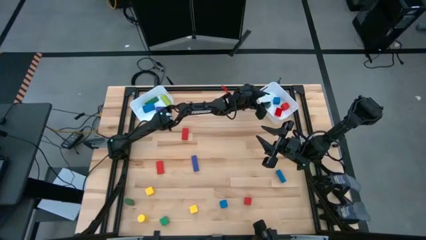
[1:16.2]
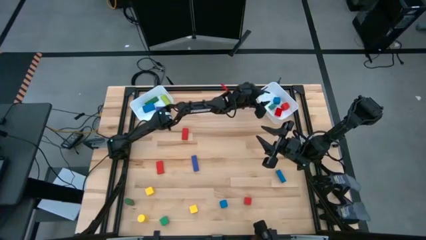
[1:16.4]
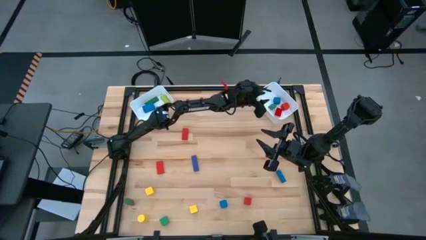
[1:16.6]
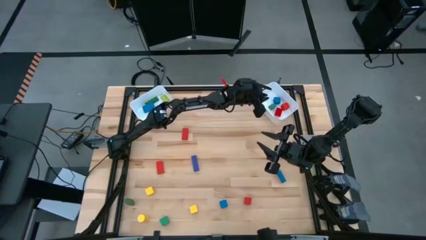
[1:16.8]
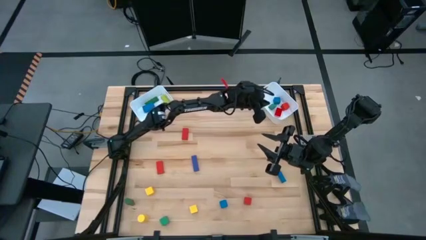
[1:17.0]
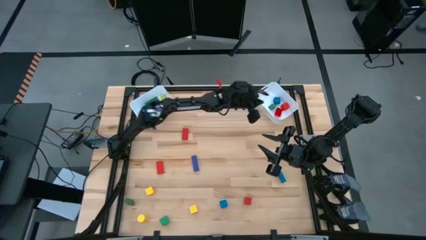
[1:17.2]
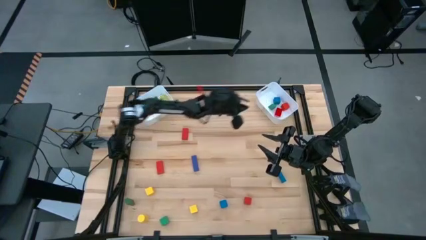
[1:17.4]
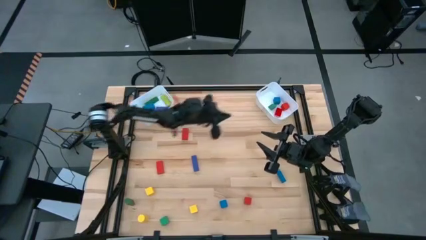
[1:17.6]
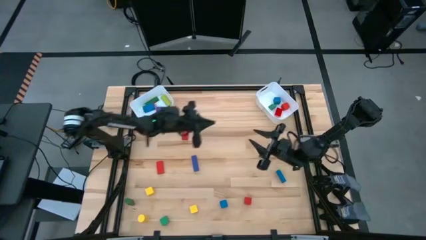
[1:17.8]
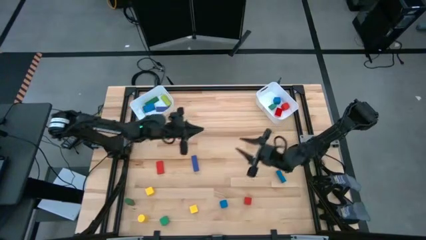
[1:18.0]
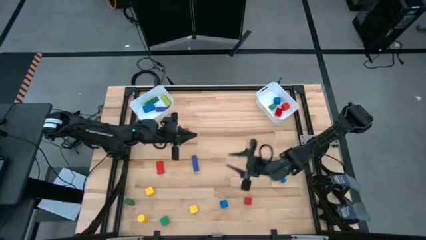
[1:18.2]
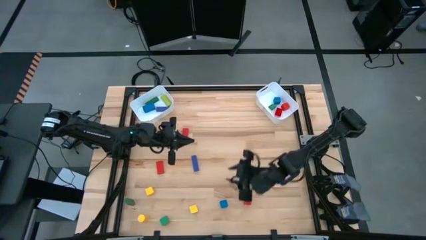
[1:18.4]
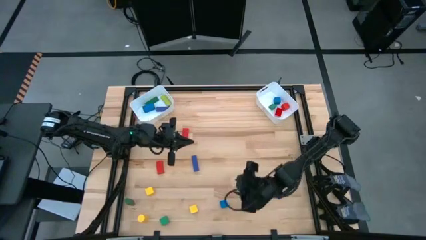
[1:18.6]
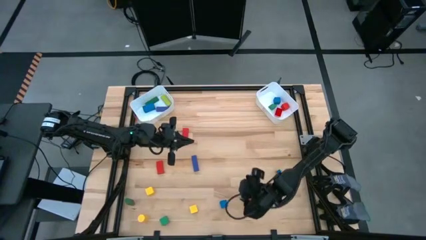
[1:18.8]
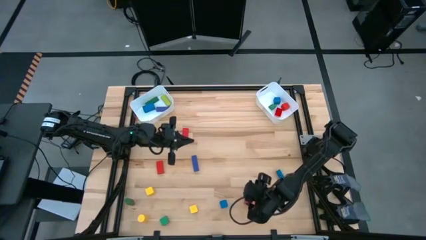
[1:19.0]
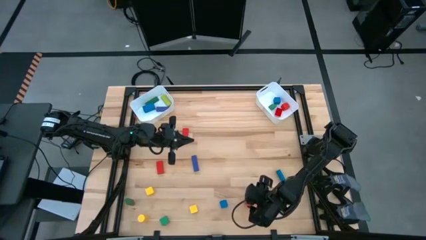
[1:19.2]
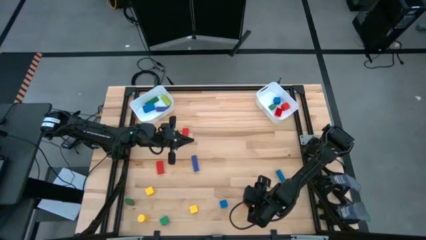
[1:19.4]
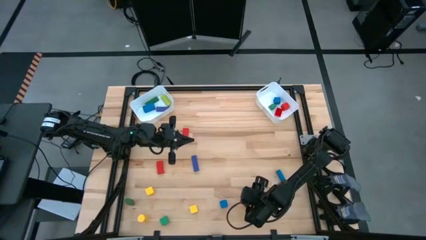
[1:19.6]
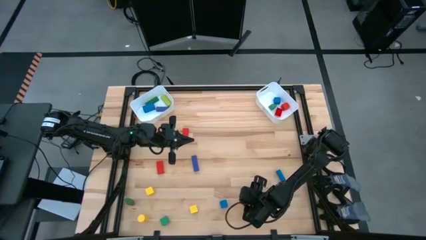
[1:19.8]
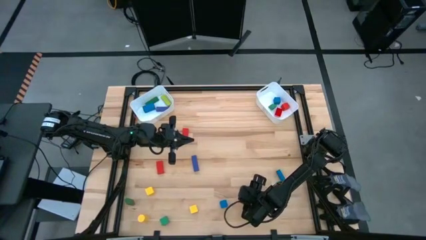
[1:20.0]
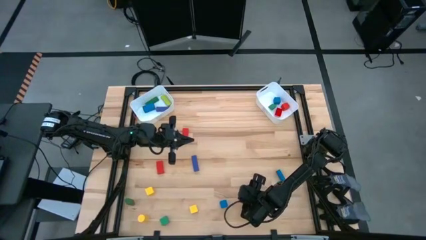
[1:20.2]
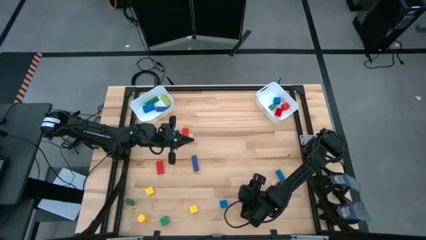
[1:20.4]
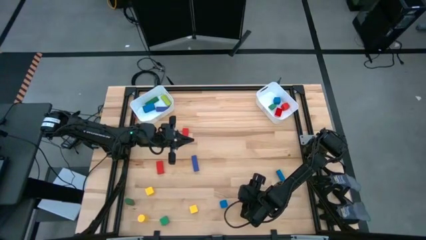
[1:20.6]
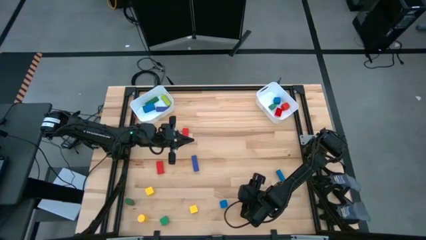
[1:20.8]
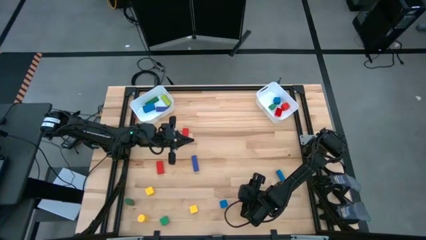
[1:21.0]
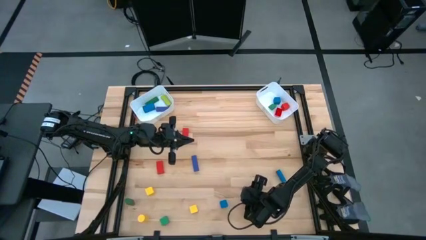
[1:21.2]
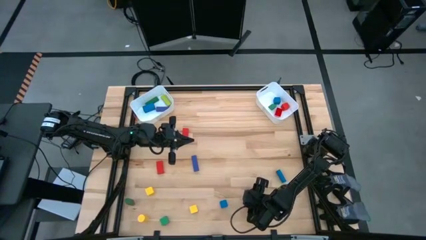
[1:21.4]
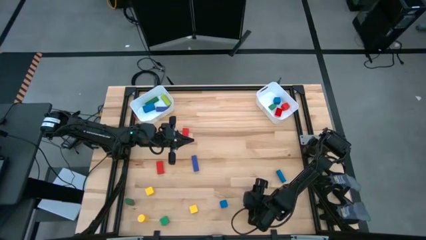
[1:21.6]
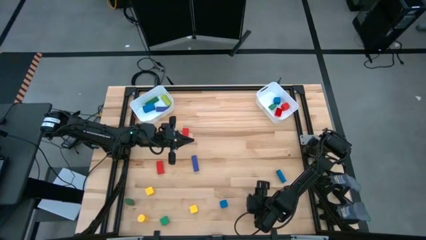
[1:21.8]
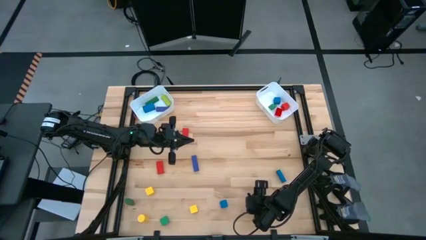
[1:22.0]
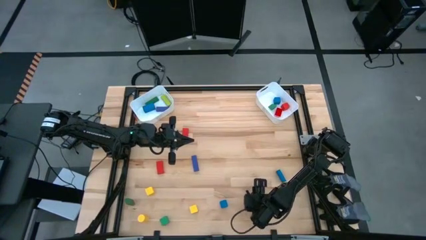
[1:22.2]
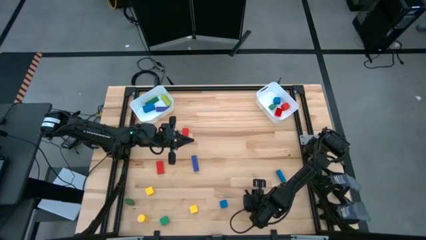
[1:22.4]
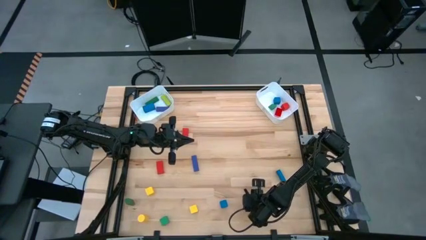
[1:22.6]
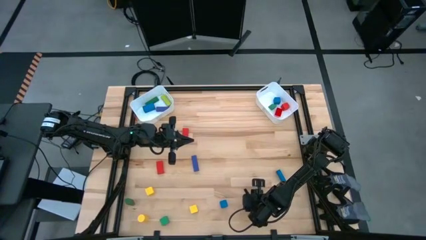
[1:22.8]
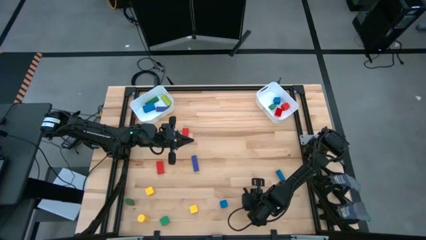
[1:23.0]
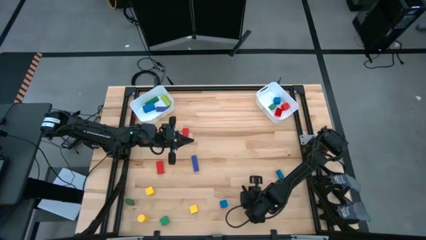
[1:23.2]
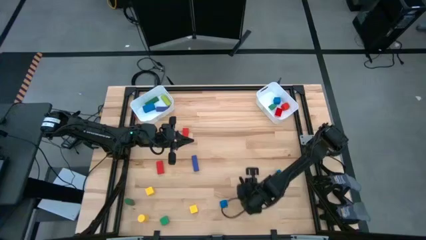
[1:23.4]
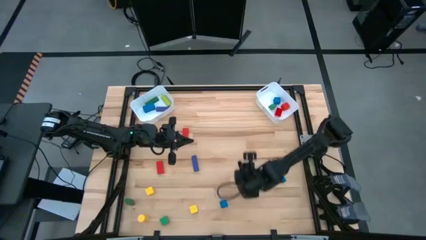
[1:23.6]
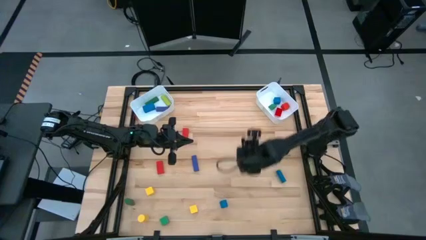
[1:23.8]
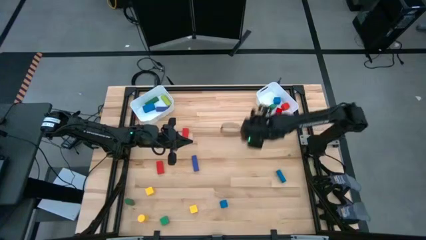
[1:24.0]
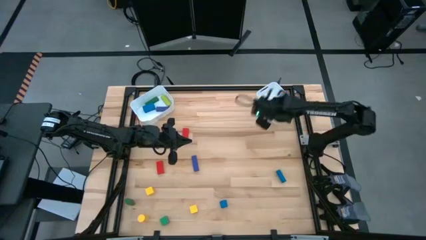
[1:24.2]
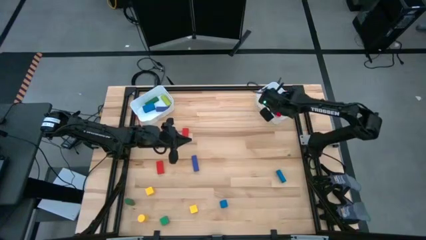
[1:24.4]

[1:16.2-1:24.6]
Task: Sort blocks by size
Put the small red block into the right white bin

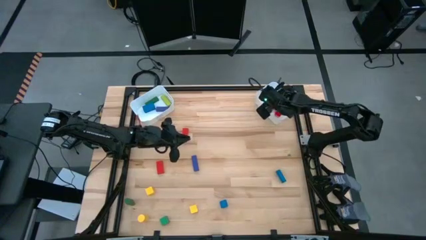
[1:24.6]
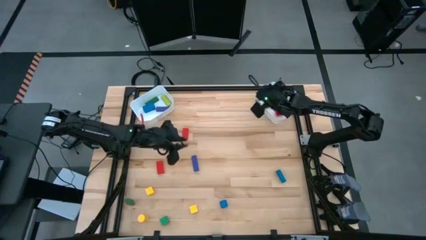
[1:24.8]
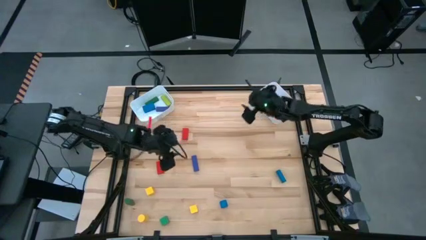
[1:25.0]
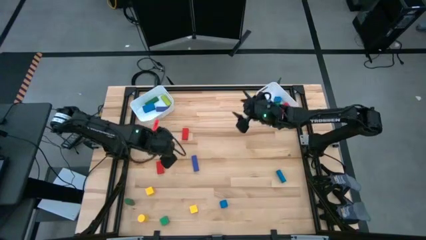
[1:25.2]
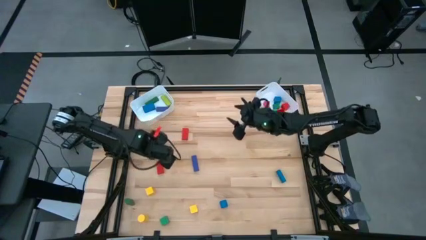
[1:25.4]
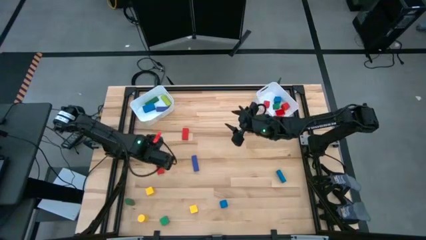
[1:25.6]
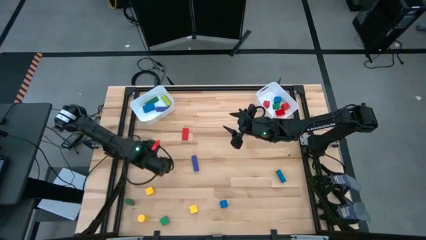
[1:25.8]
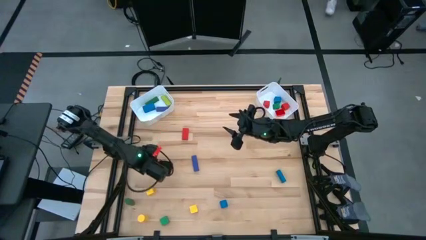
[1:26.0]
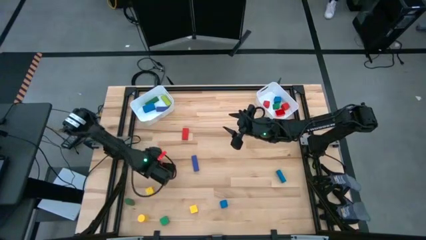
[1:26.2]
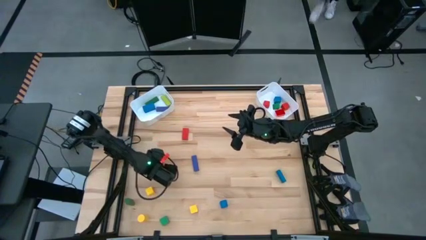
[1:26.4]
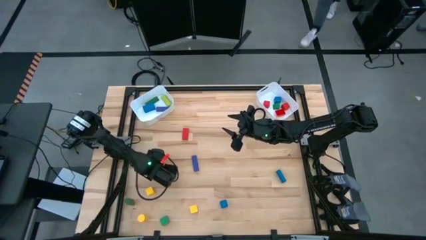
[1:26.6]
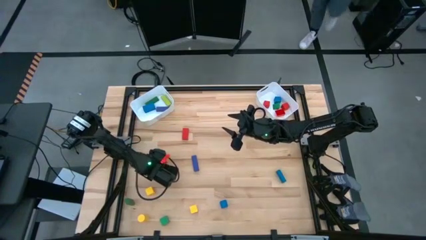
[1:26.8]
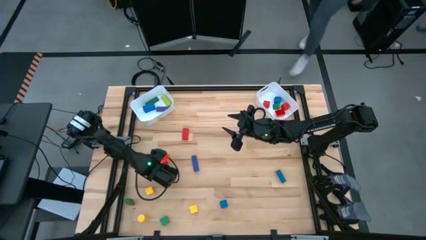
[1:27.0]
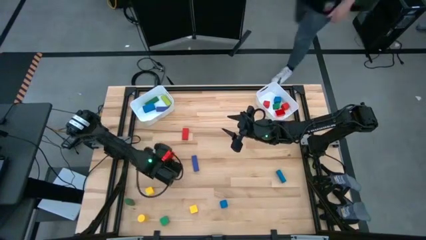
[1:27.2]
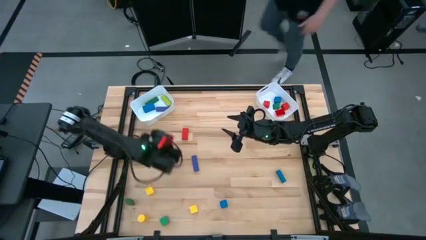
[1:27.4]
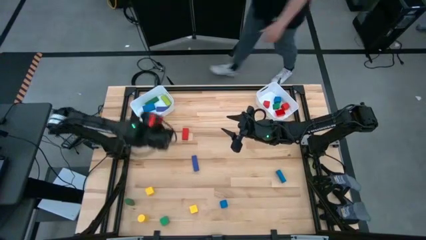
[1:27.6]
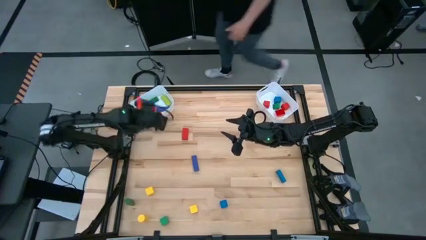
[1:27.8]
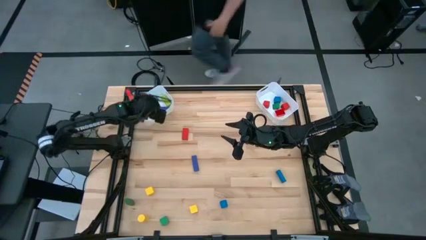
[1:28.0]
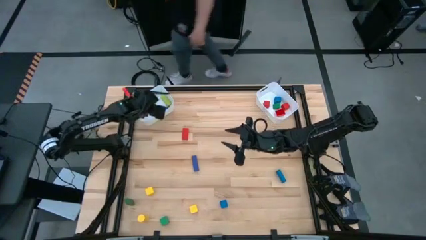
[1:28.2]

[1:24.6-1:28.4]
Put the large red block into the left white bin

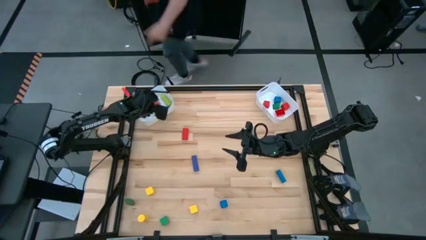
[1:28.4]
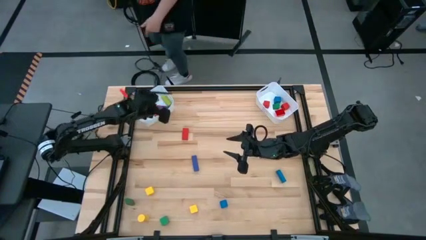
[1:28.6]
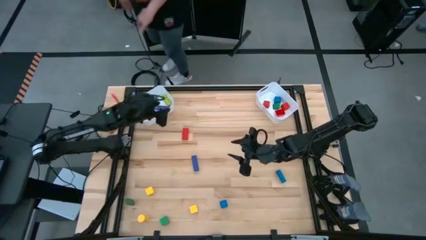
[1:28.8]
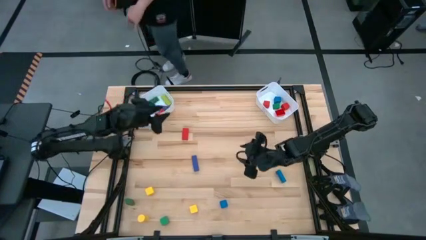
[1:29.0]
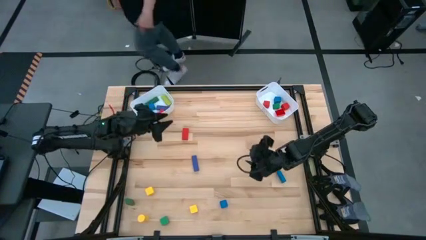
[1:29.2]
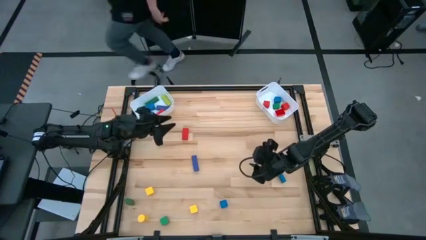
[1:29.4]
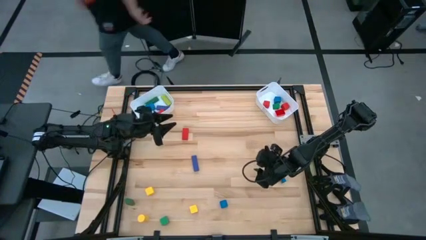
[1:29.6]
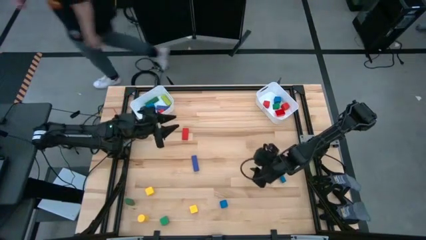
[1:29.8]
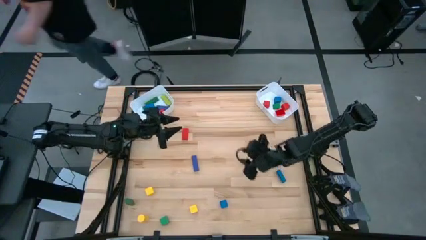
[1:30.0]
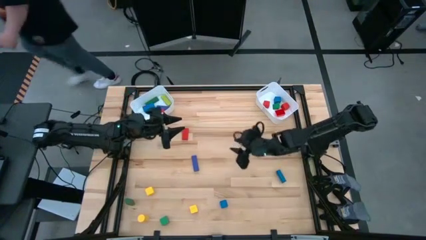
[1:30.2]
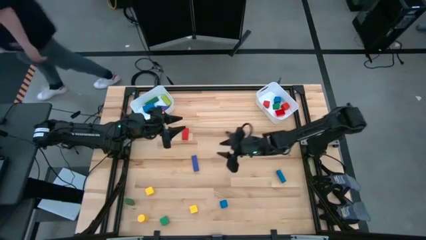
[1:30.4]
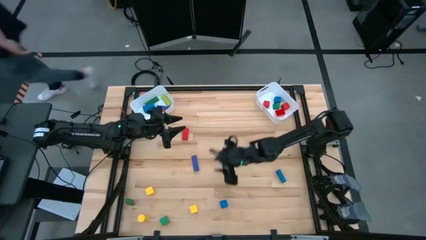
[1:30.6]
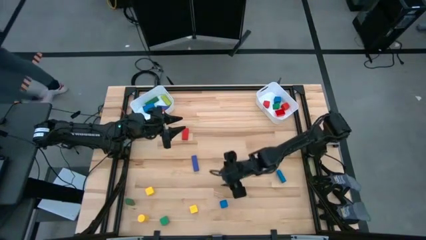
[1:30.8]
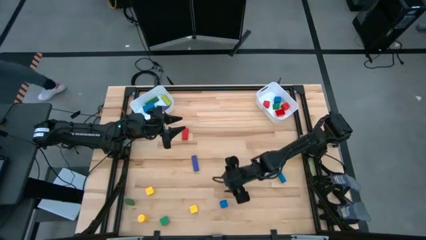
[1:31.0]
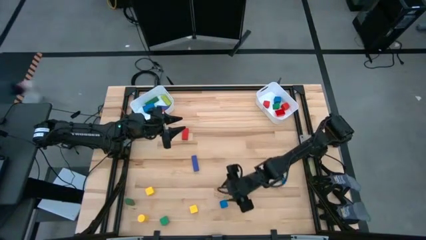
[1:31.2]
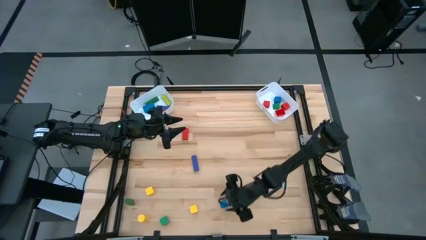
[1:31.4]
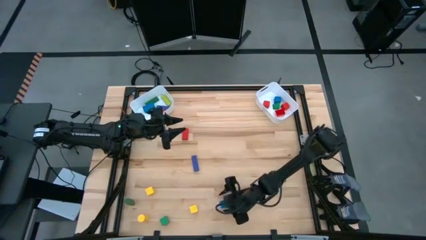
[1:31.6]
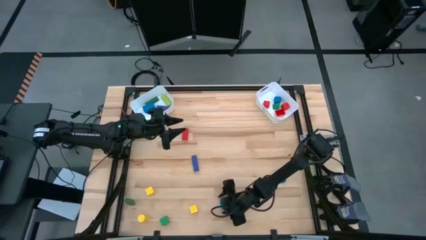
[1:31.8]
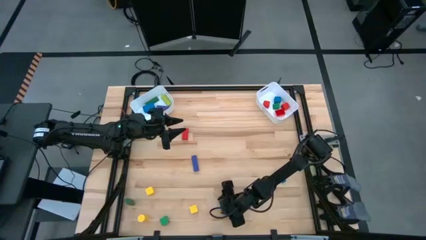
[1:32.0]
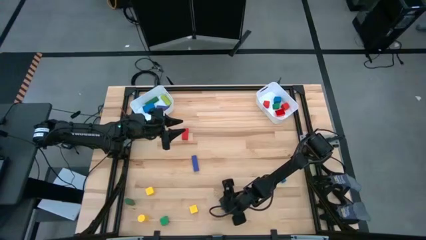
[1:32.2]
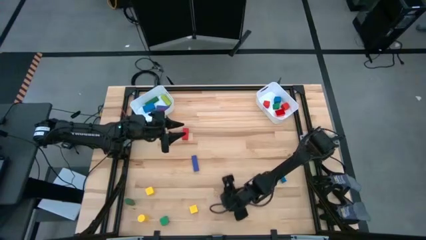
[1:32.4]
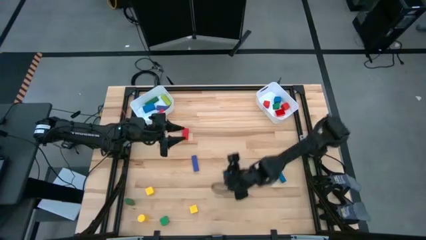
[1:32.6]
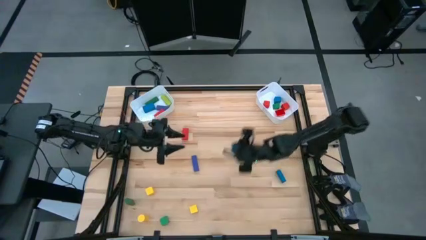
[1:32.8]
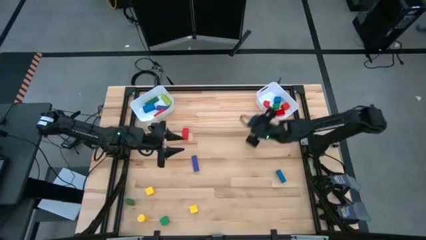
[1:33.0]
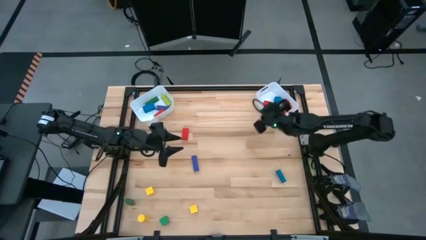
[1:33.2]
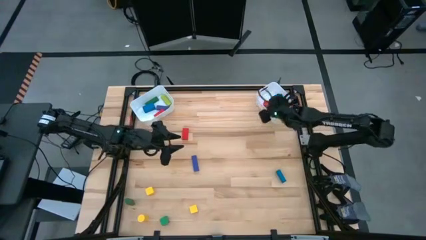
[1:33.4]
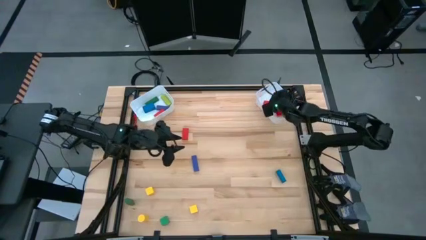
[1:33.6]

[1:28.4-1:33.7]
Put the small blue block into the right white bin
